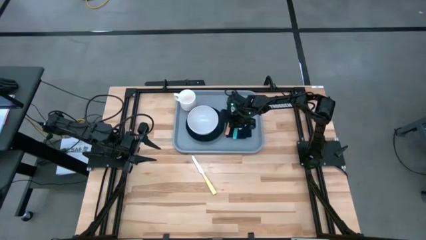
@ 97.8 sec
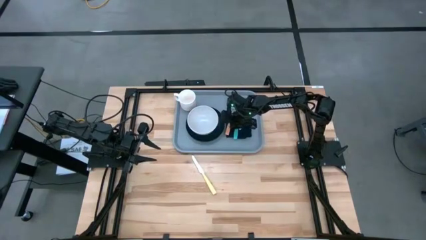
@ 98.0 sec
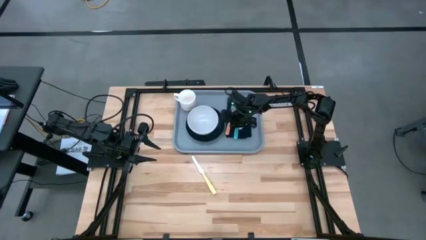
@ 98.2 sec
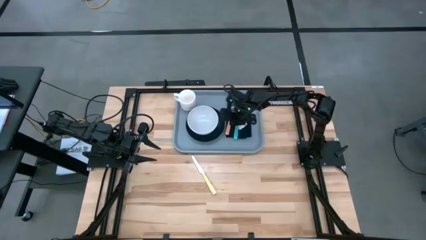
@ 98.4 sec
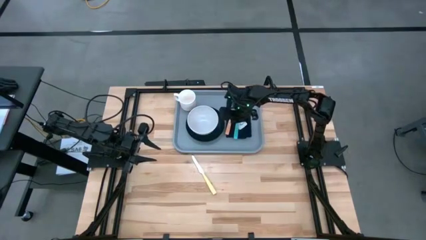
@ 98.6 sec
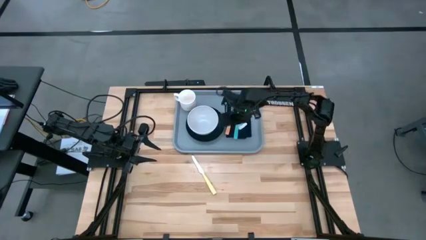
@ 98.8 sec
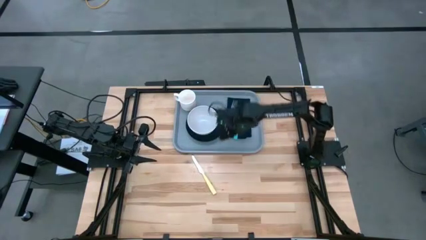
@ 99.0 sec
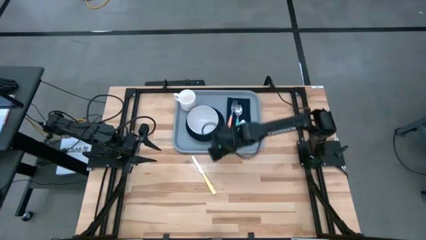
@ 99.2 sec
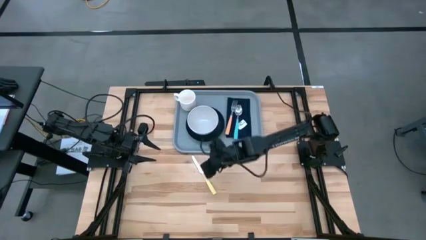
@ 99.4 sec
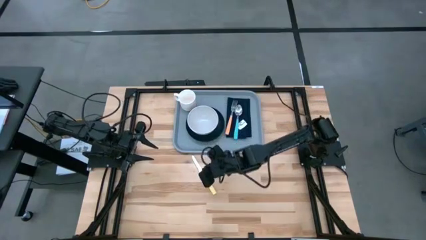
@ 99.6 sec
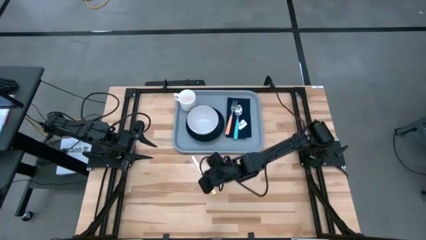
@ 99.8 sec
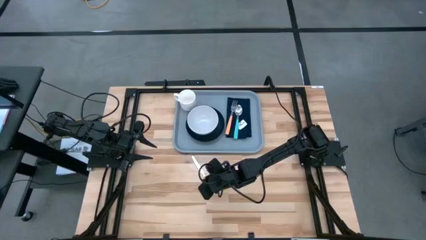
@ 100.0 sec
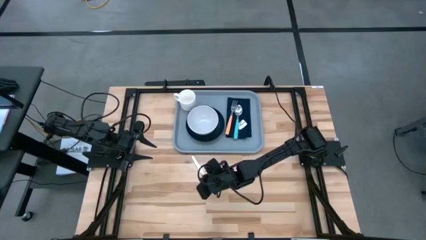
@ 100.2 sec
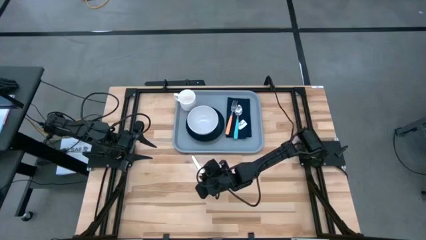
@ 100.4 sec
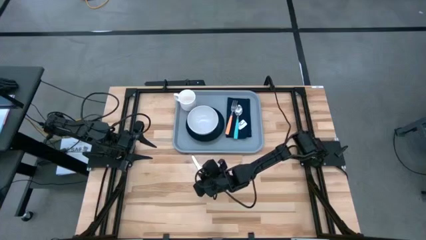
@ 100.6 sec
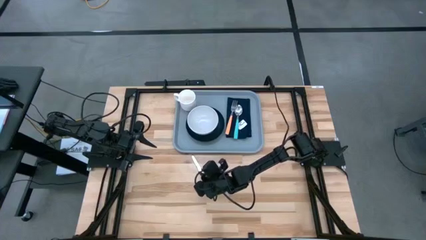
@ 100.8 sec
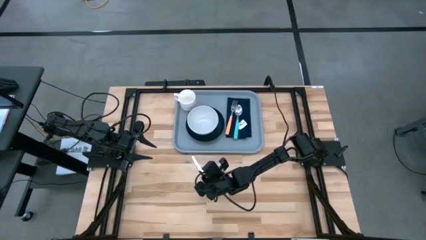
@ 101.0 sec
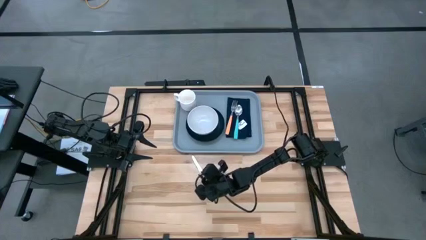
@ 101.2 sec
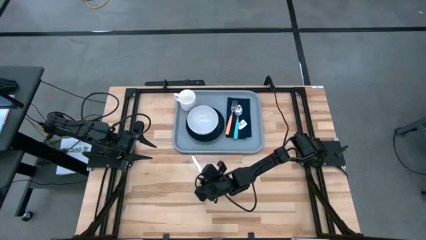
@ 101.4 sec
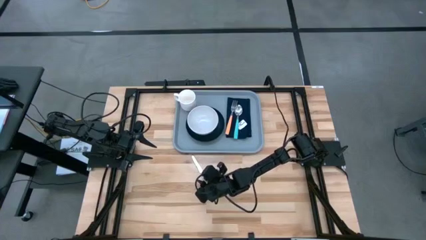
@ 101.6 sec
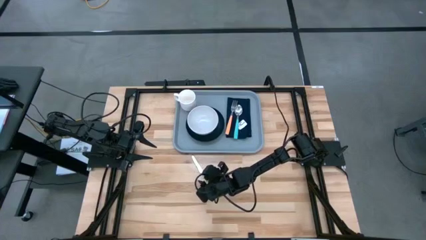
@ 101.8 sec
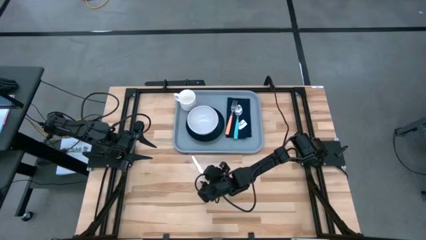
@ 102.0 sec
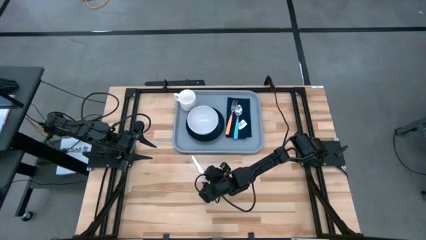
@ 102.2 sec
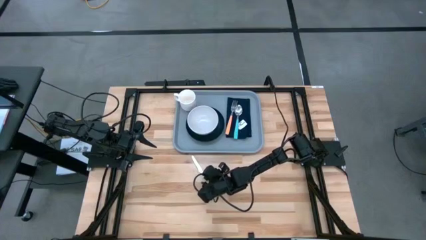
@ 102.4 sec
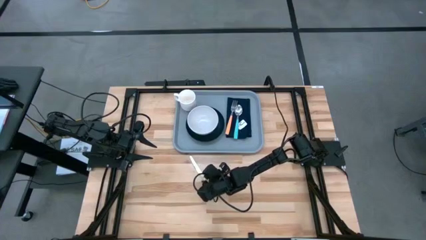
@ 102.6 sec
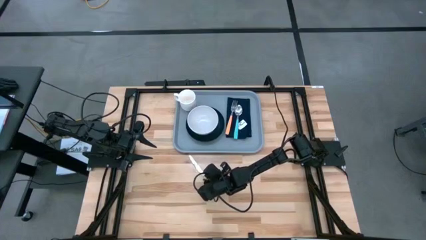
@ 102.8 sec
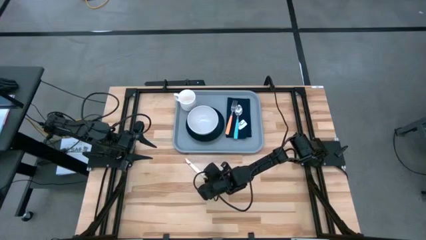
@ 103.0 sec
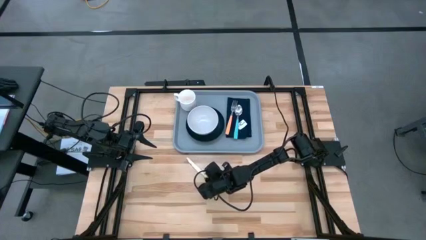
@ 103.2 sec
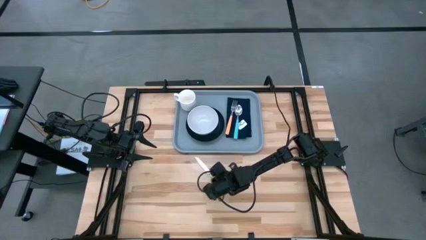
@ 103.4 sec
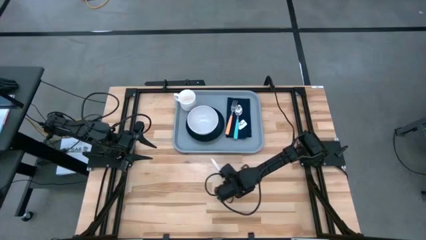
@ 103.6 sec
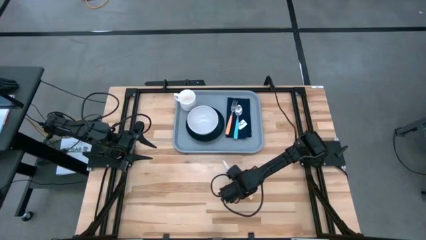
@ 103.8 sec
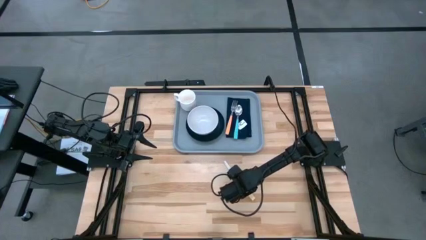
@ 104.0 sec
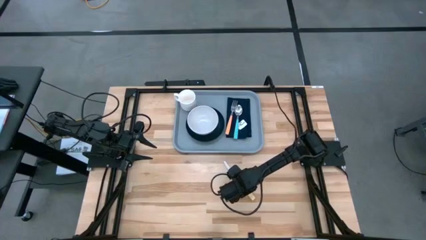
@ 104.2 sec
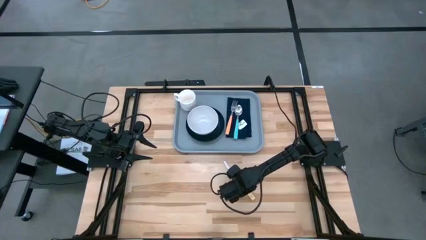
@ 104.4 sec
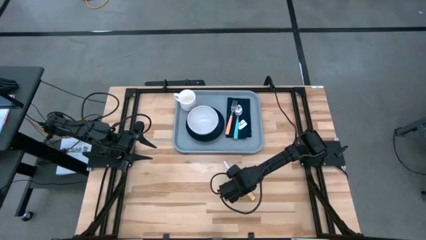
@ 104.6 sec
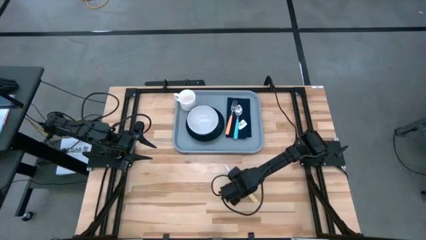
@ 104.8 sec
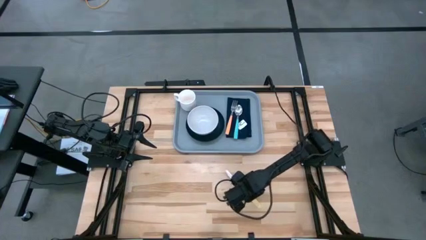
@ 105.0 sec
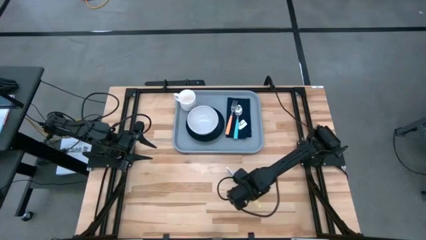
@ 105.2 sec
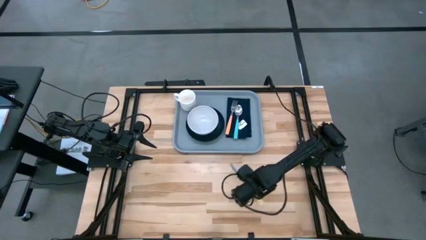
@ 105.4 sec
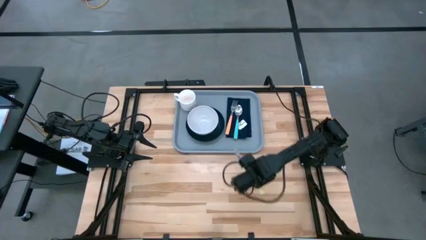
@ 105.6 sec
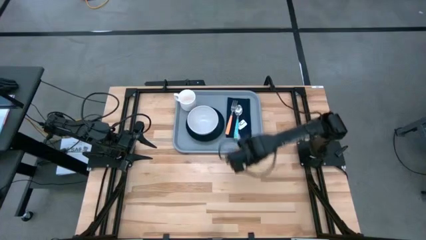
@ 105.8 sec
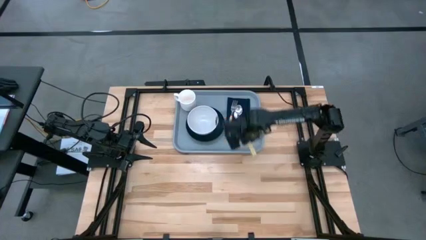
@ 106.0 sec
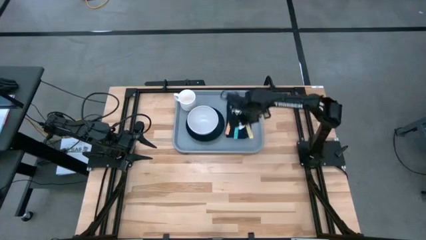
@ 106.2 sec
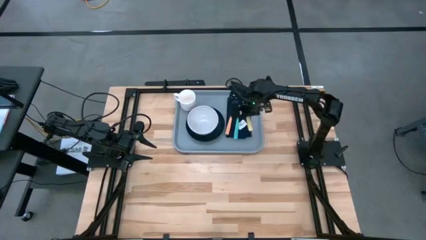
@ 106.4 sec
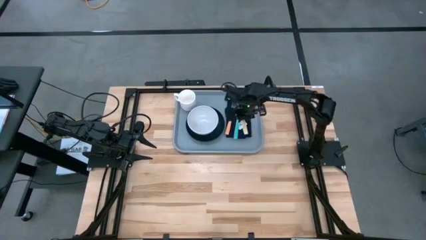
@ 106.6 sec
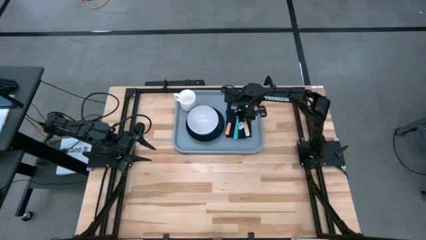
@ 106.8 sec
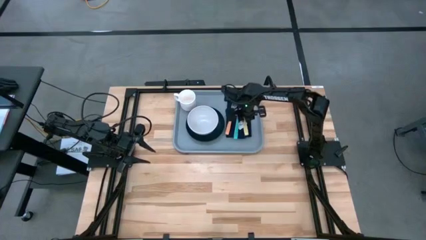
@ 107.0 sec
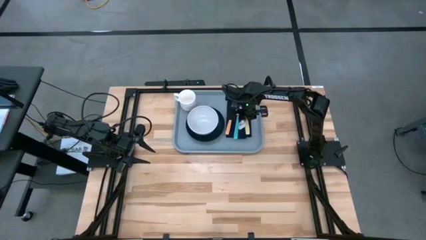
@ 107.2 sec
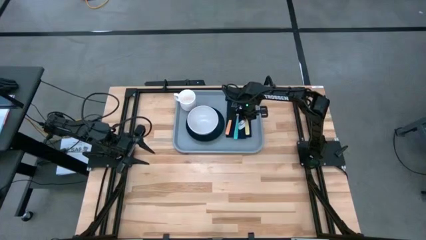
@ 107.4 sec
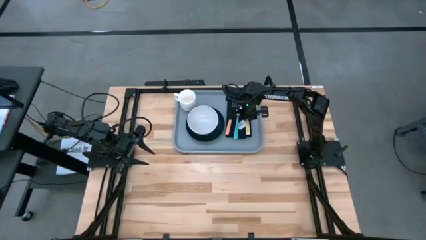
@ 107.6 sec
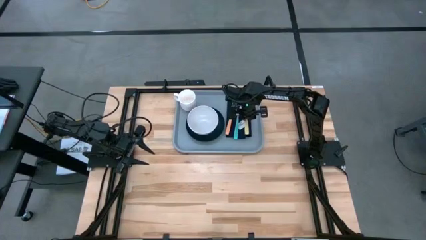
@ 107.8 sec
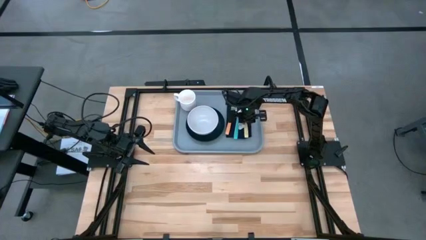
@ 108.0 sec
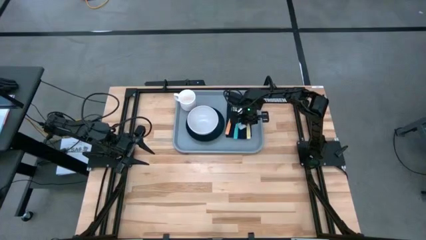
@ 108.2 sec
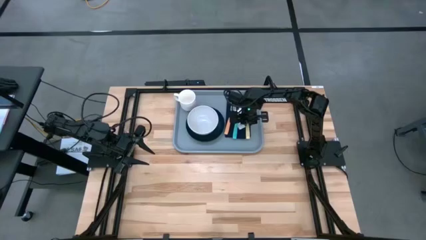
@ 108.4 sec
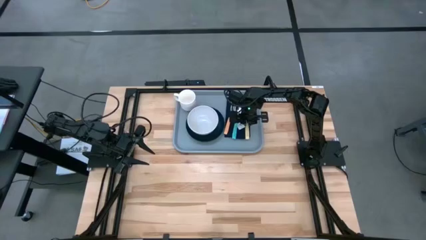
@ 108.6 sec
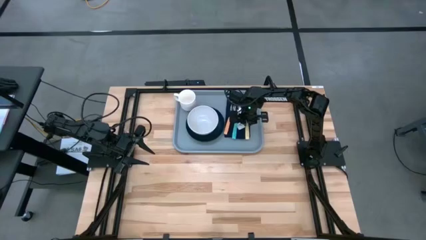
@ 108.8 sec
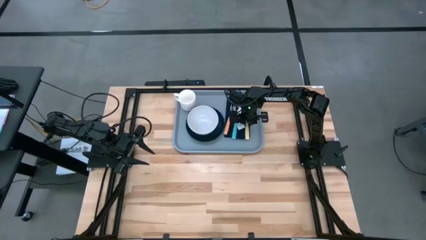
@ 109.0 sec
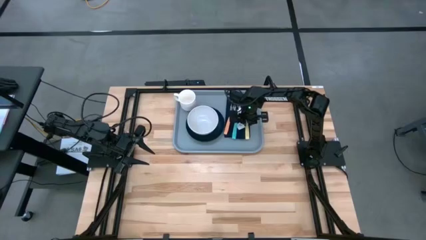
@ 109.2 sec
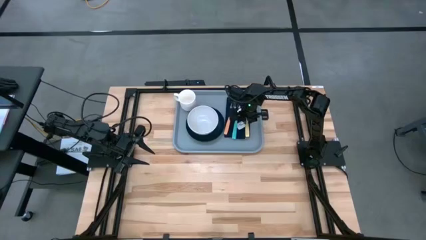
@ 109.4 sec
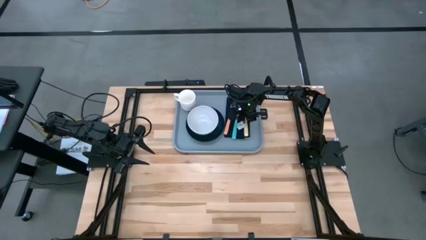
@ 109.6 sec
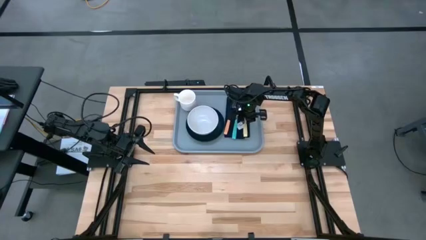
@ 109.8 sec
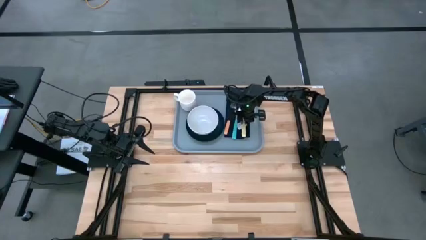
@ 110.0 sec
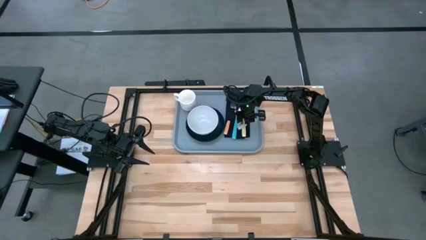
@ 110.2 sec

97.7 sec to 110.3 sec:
Task: Set up tray
Put the yellow knife to the right of the blue spoon on the black napkin

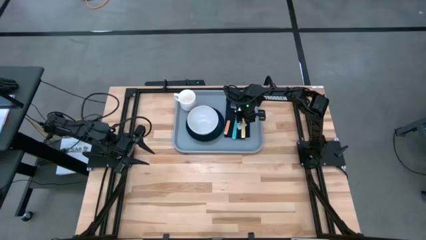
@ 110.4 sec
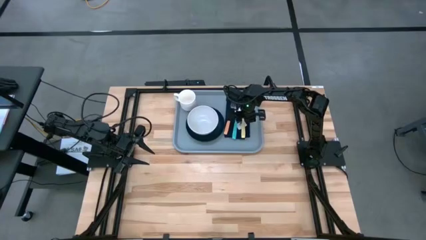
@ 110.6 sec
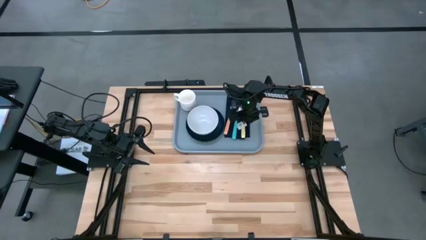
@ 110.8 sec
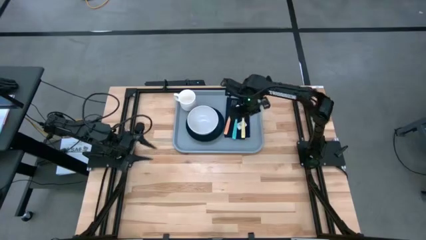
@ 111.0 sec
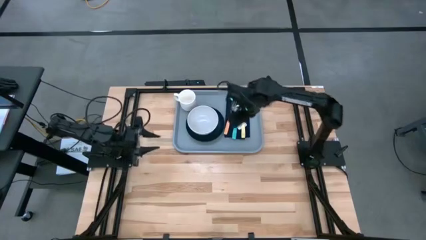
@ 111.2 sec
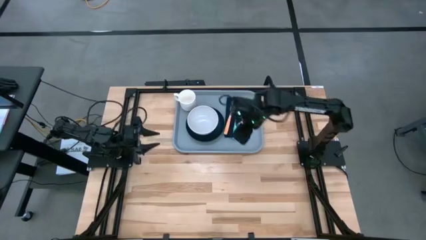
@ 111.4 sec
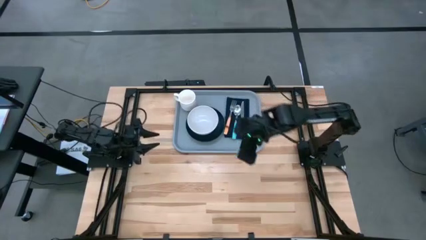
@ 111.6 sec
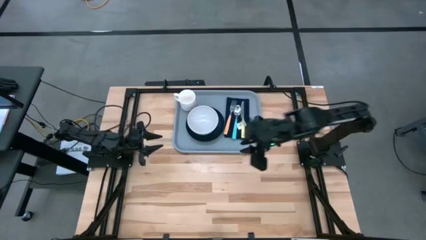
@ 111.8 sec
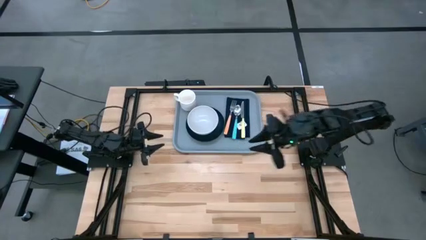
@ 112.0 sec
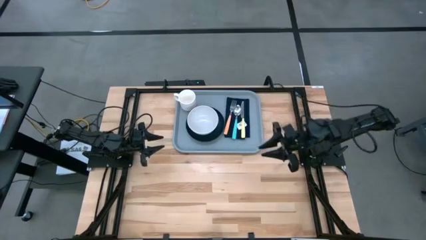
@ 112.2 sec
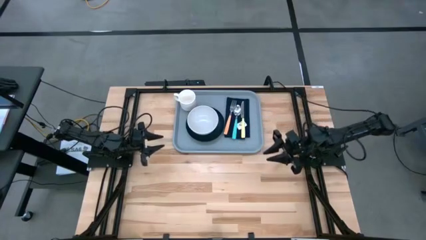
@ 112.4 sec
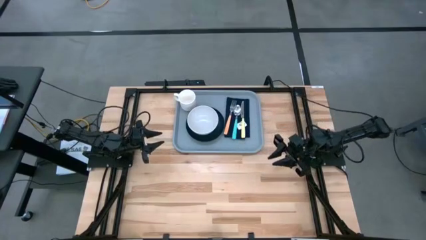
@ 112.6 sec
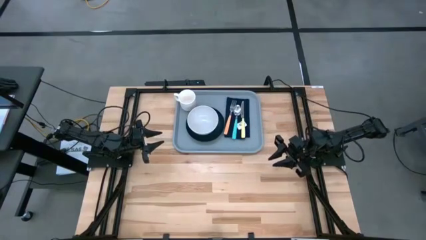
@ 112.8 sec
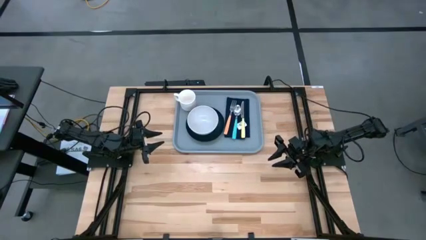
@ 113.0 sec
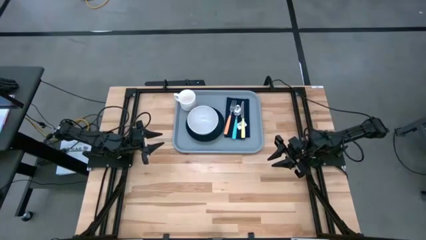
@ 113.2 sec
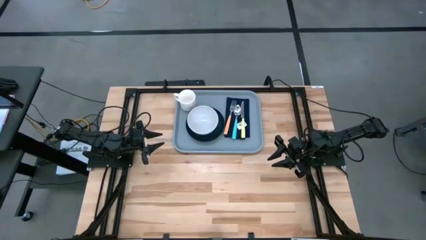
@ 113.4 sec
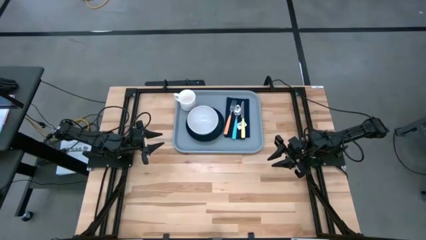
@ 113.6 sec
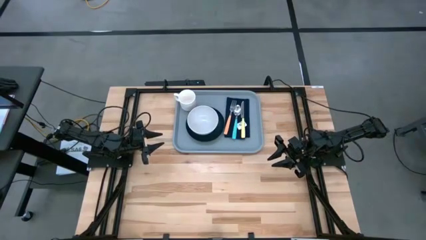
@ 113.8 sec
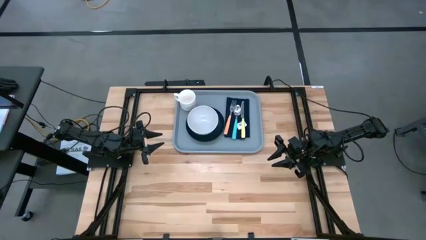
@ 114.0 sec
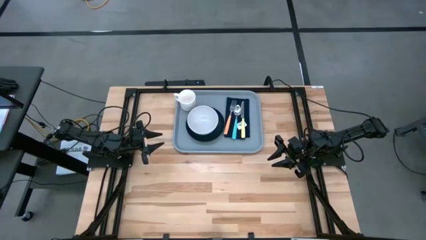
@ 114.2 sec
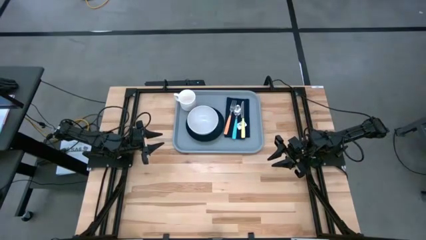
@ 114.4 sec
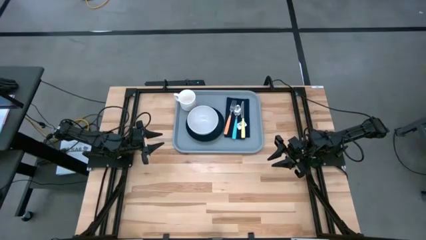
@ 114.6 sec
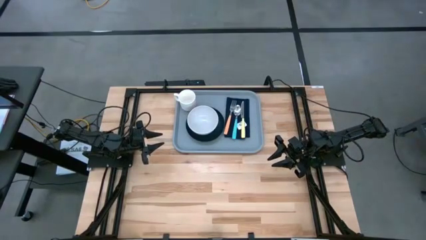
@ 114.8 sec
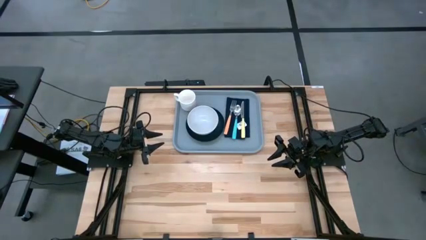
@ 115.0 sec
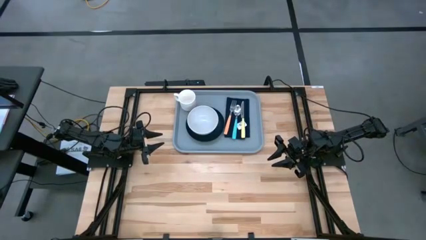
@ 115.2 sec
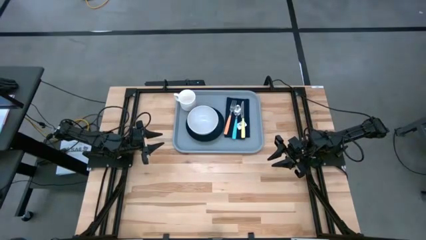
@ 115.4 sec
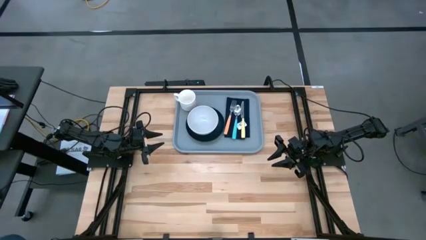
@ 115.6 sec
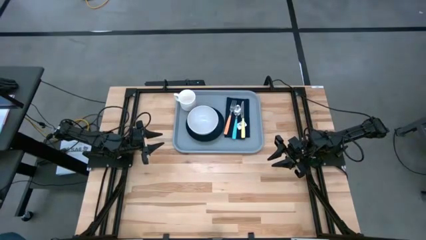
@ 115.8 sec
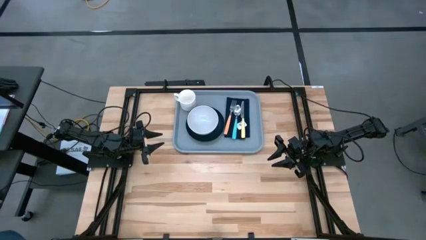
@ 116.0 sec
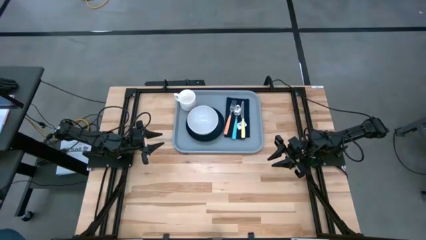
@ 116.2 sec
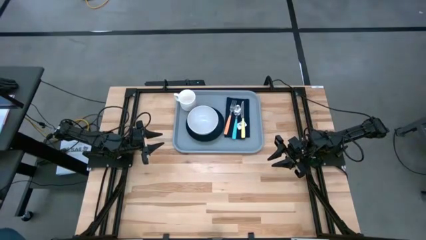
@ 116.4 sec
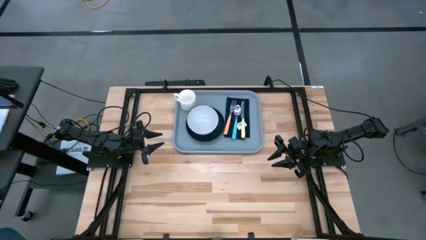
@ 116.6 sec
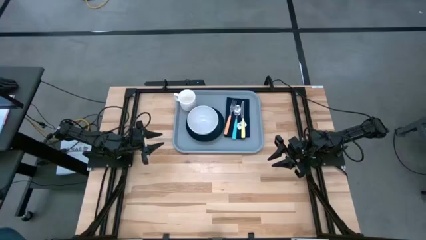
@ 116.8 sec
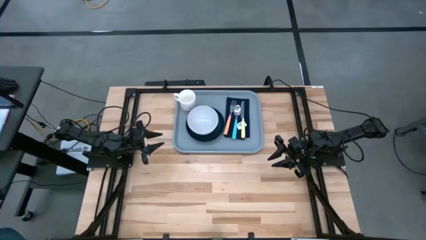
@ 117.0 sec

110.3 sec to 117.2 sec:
Return to Home Position
